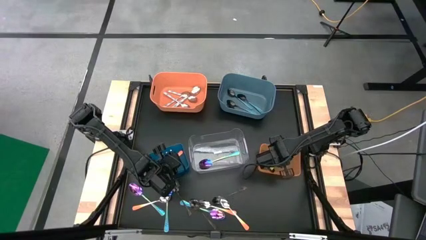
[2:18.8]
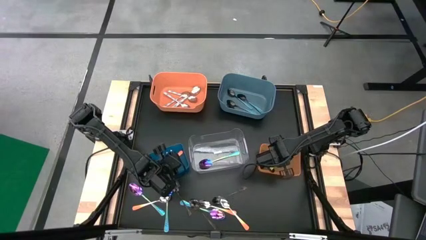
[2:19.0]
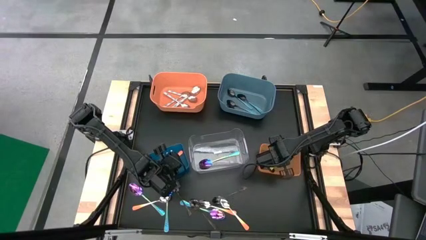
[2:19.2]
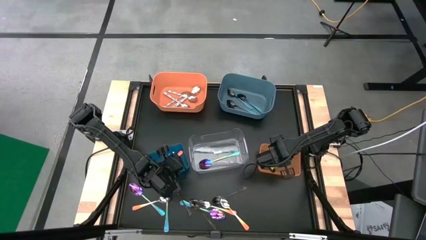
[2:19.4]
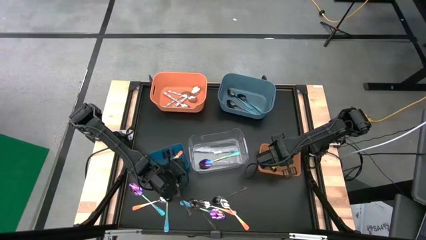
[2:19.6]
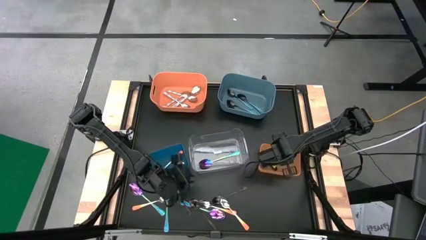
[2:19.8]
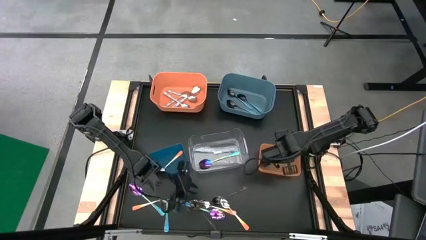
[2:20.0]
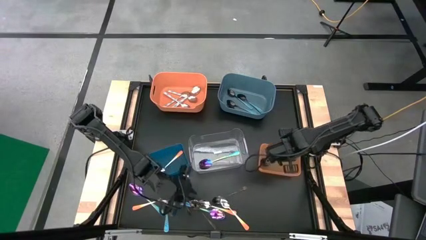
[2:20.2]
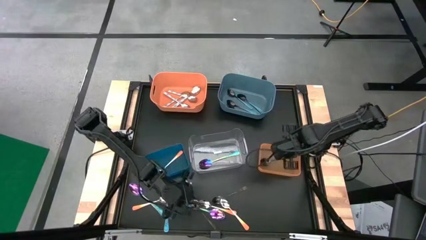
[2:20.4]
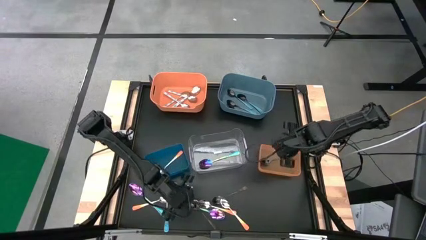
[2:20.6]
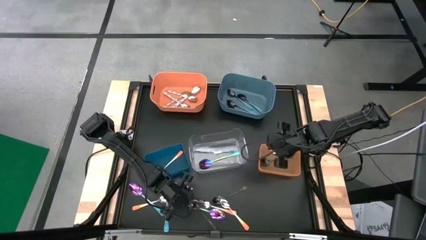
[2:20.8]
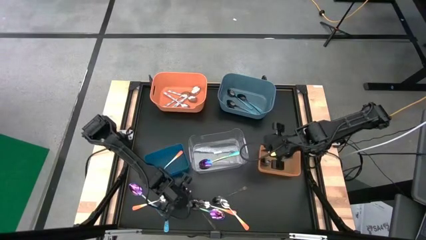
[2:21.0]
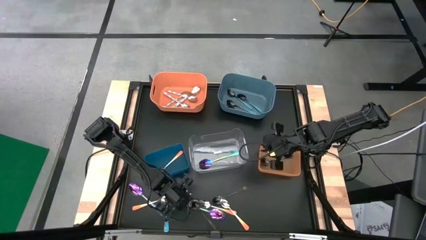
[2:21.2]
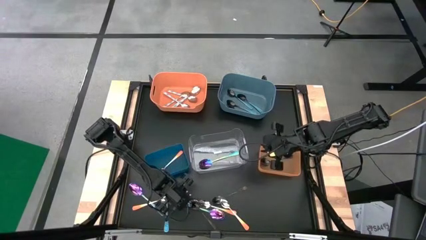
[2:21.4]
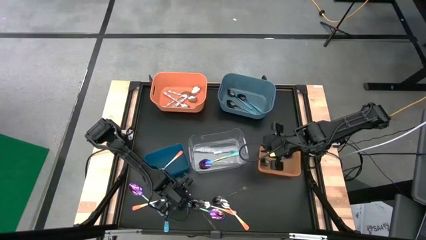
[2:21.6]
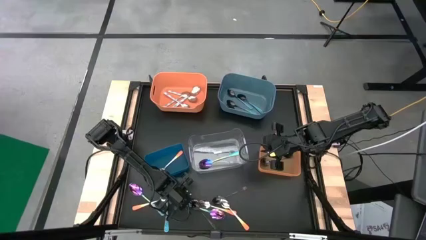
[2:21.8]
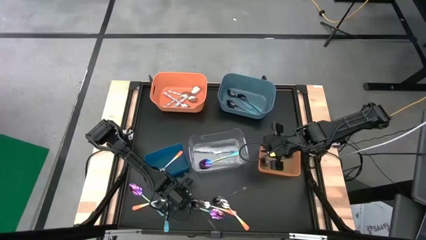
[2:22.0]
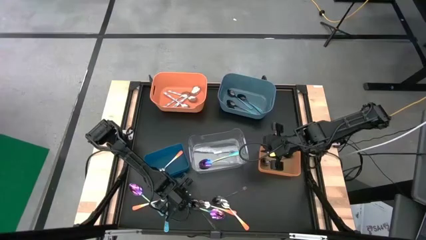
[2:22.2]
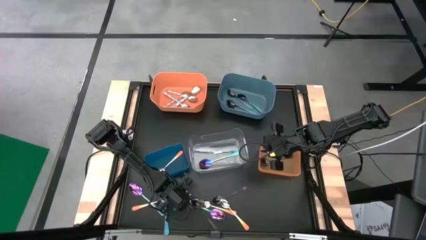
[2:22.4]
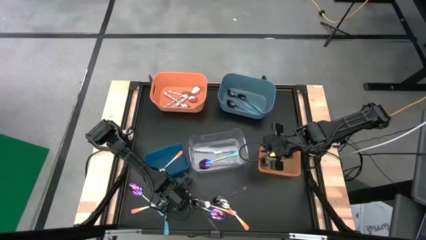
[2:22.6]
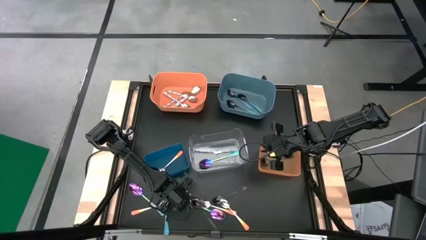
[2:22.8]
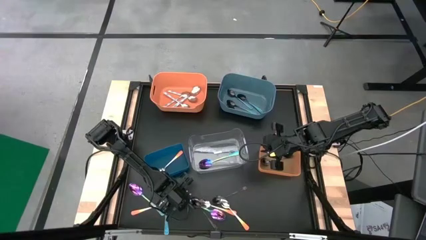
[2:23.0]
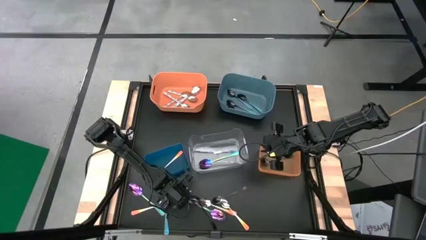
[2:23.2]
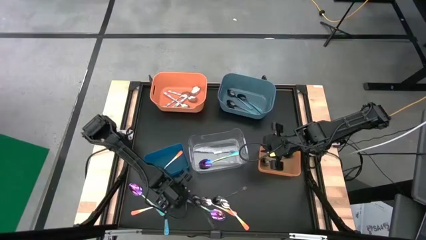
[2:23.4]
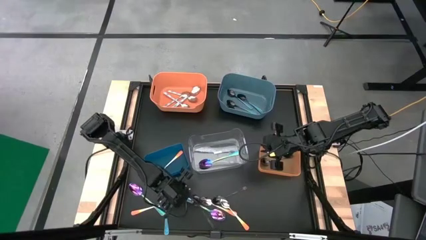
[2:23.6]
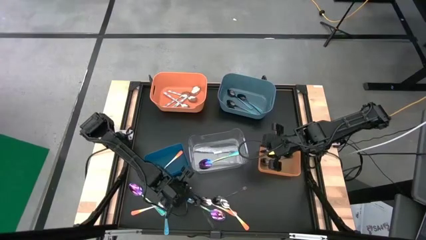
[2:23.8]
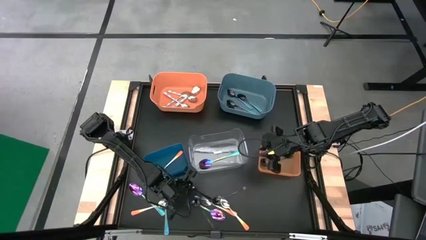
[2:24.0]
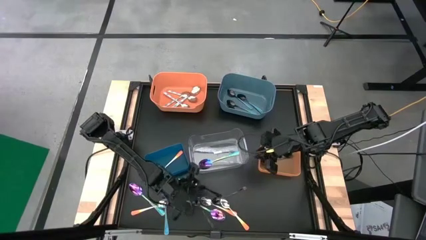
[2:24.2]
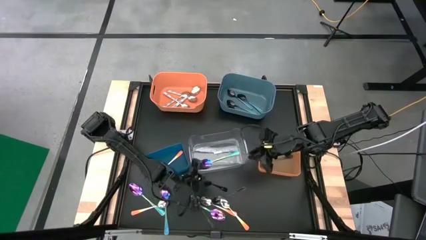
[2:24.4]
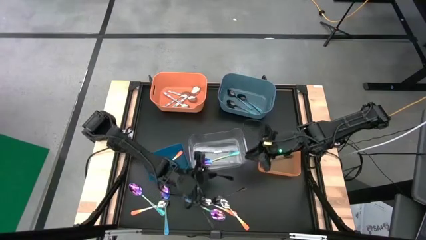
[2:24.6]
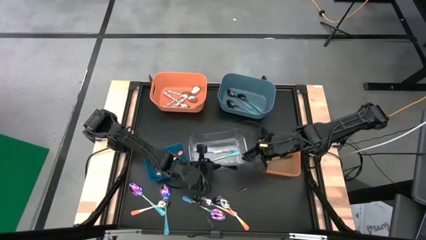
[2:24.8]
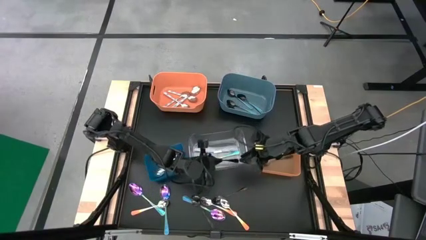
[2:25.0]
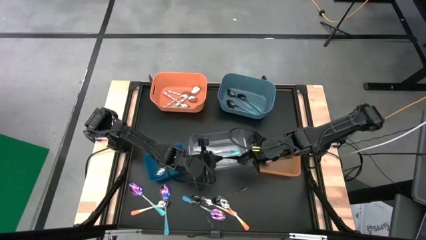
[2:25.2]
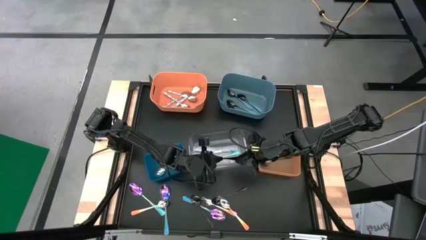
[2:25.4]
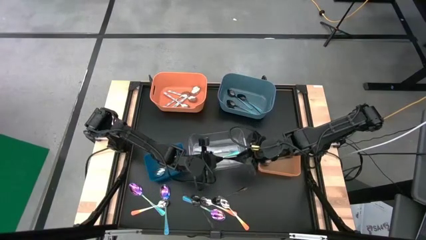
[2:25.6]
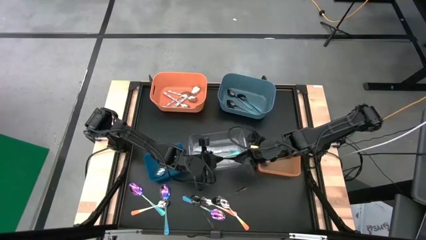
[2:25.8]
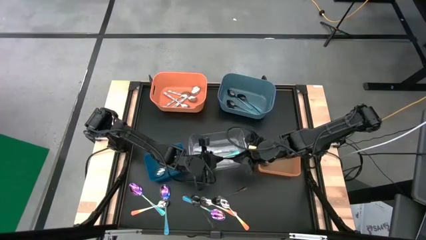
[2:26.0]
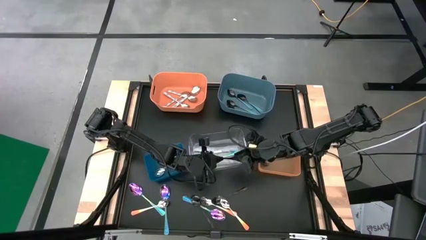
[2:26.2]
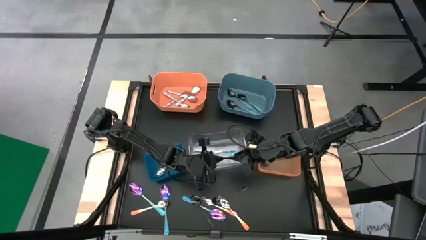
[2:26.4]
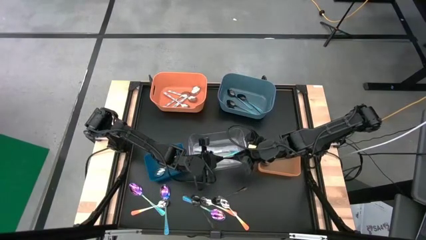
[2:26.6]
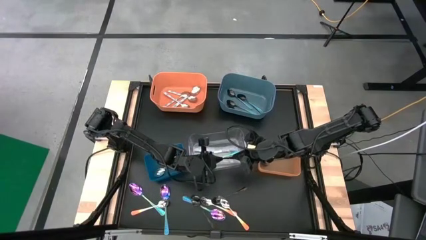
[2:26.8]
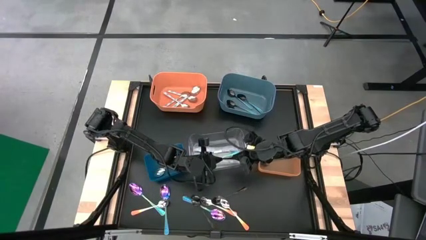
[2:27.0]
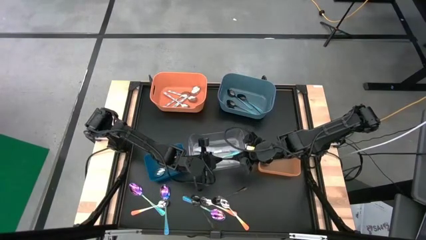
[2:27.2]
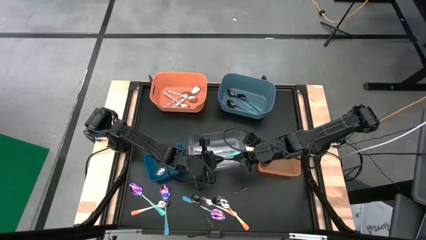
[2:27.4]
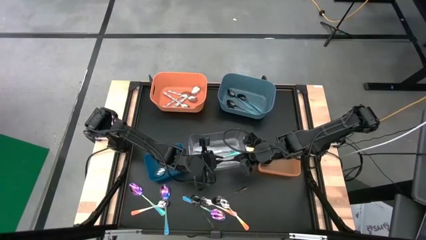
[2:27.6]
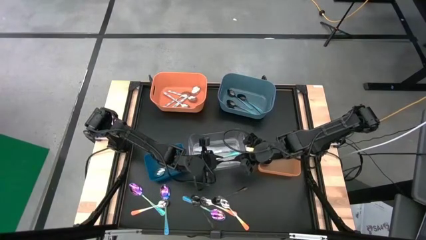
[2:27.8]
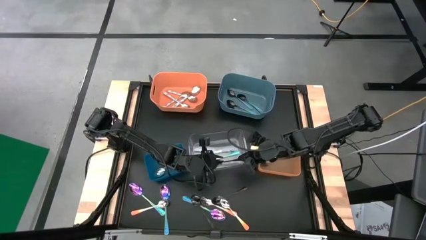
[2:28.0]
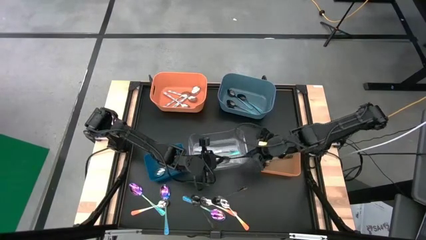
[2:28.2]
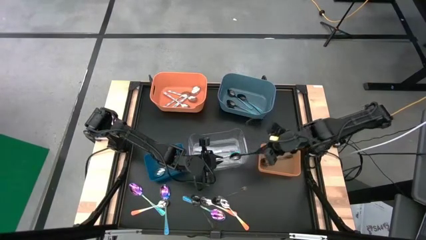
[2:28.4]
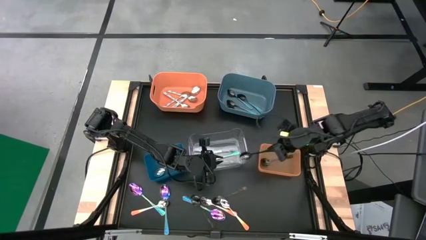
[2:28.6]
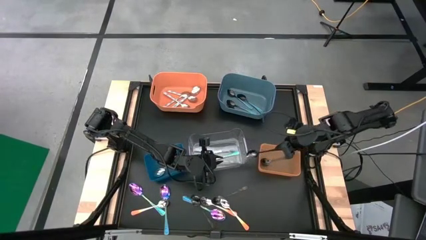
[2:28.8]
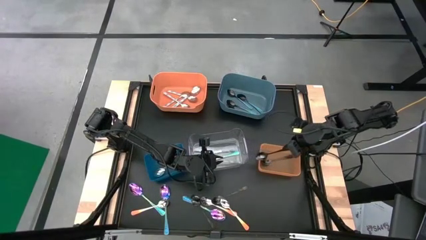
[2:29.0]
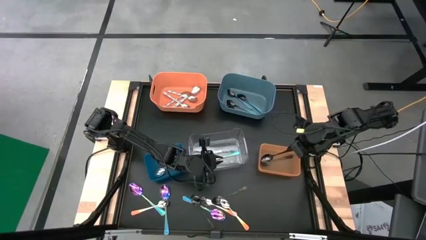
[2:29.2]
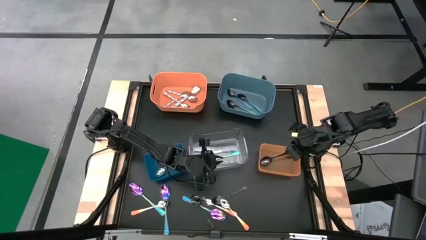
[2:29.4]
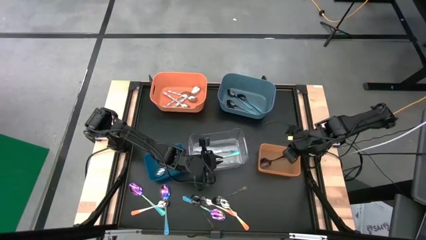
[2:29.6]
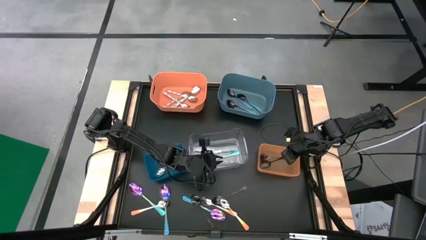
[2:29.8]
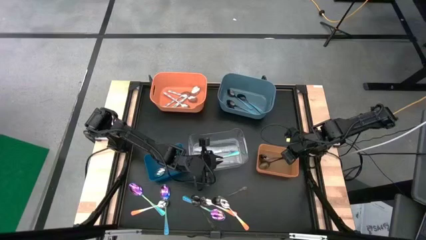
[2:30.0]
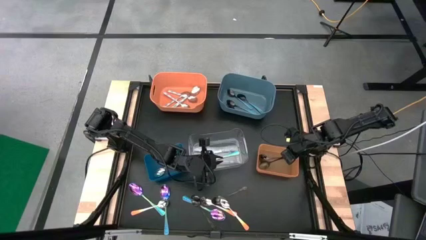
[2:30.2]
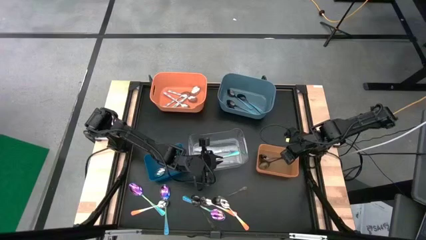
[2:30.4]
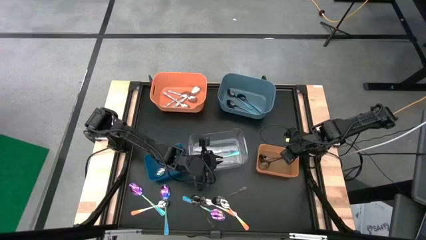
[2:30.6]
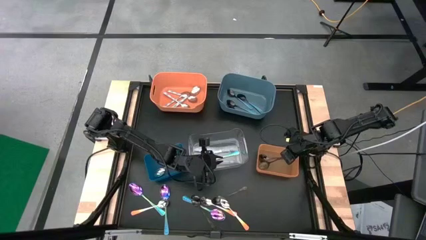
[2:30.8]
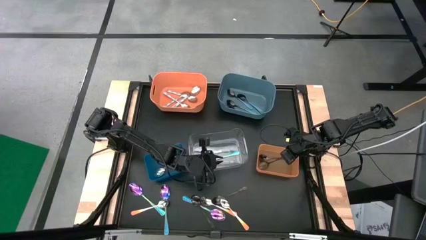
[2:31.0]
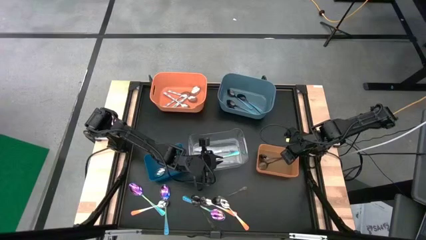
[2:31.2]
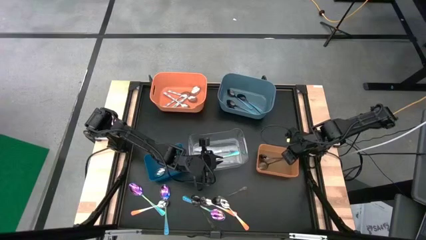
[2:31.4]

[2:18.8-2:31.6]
Task: Sort silverware by color (type)
Put the black spoon into the light orange bin
